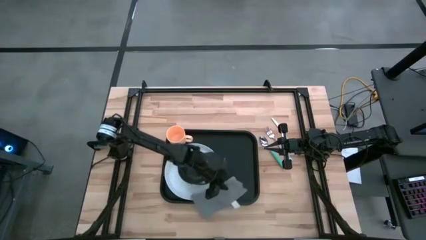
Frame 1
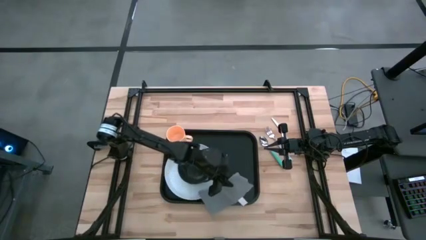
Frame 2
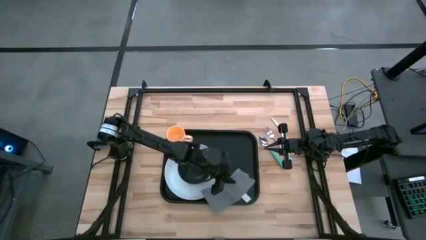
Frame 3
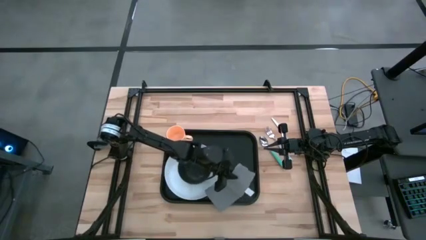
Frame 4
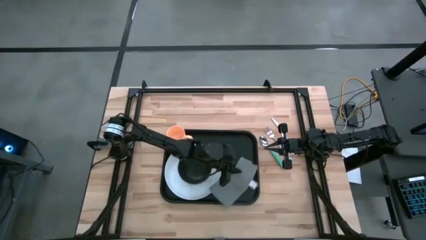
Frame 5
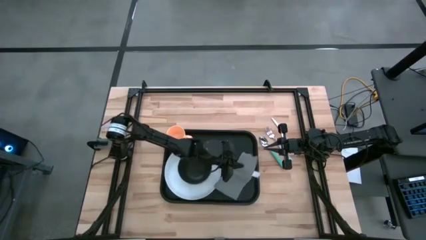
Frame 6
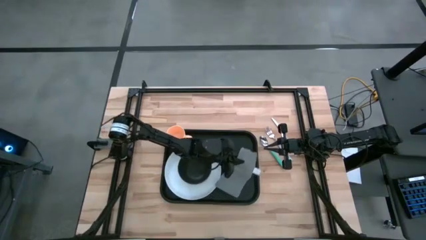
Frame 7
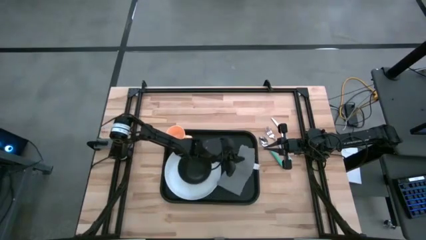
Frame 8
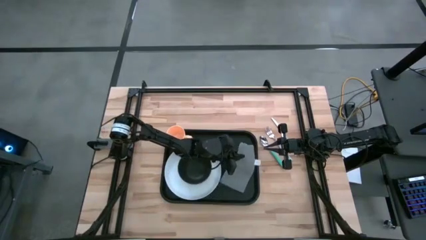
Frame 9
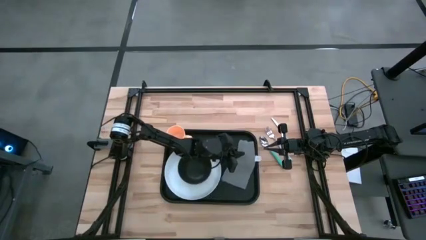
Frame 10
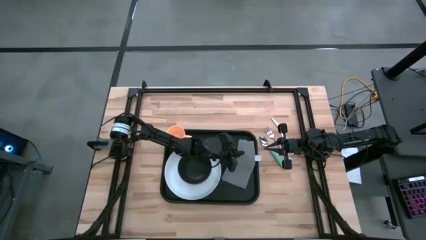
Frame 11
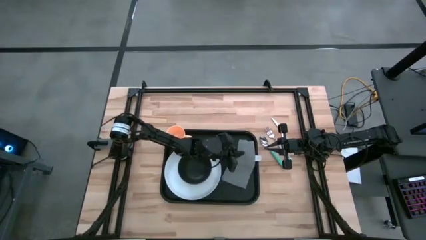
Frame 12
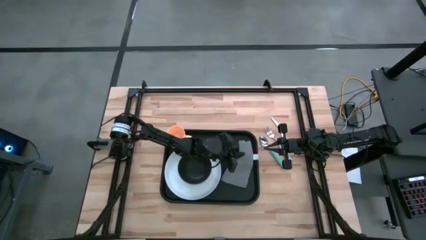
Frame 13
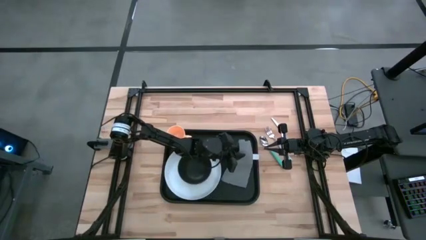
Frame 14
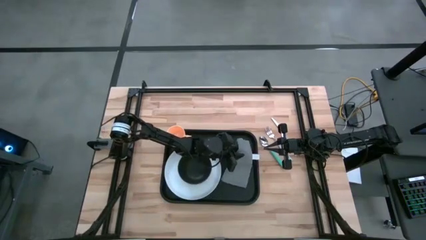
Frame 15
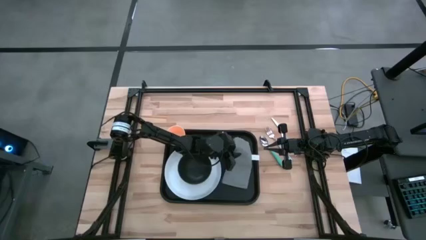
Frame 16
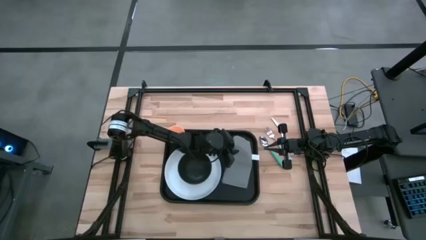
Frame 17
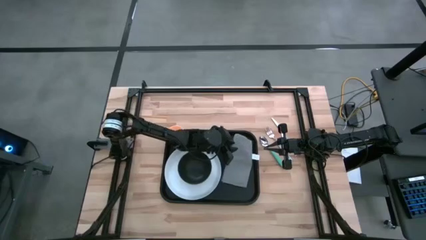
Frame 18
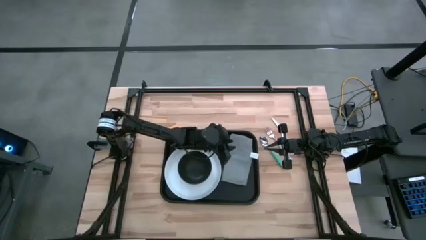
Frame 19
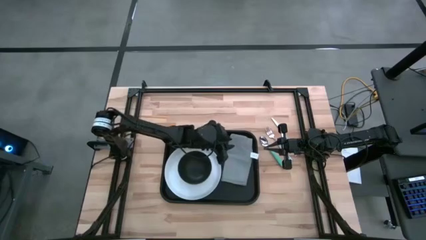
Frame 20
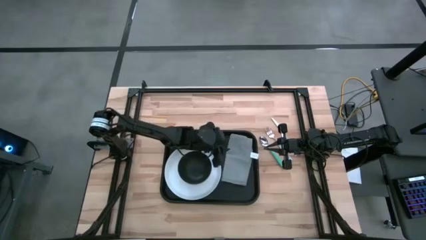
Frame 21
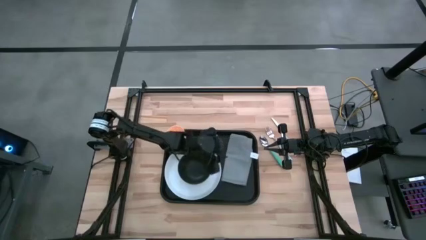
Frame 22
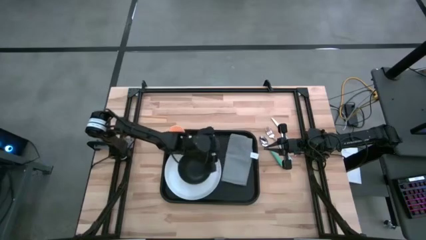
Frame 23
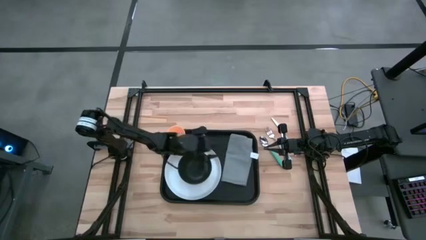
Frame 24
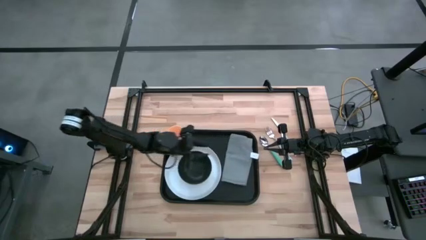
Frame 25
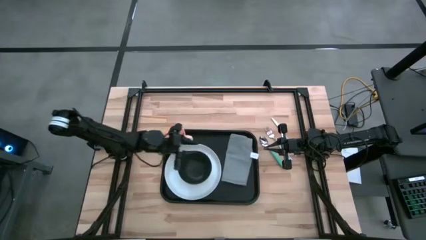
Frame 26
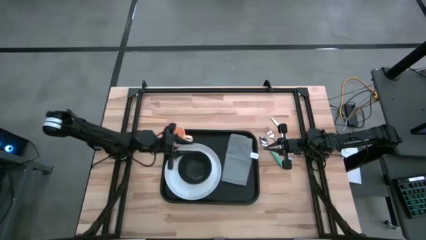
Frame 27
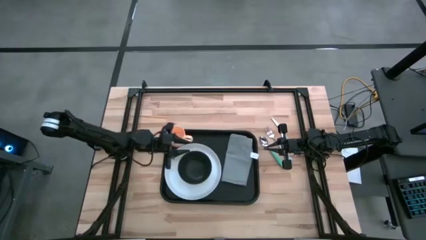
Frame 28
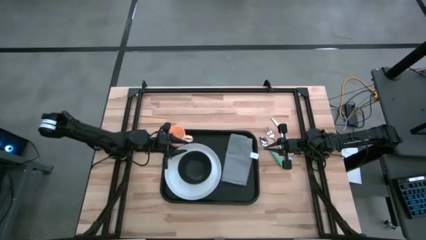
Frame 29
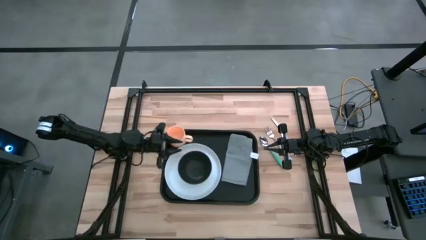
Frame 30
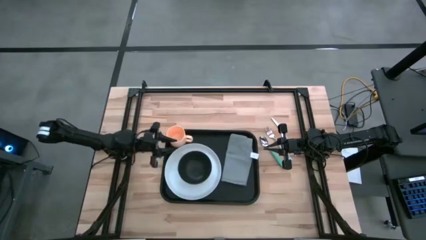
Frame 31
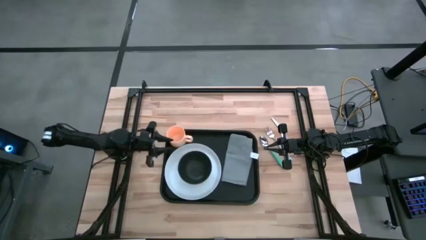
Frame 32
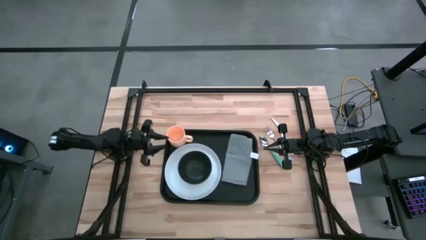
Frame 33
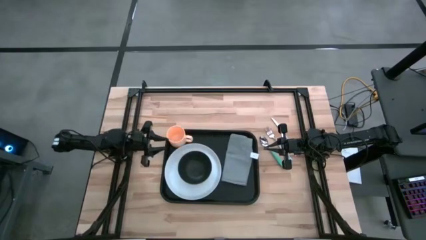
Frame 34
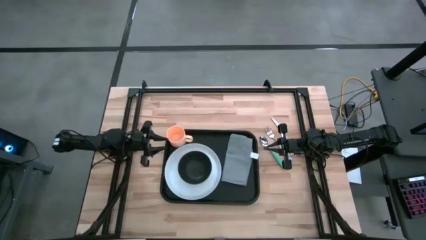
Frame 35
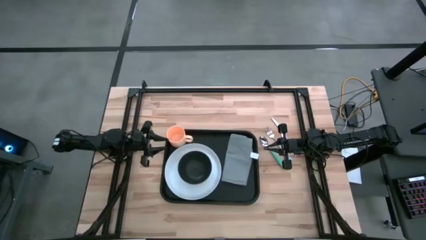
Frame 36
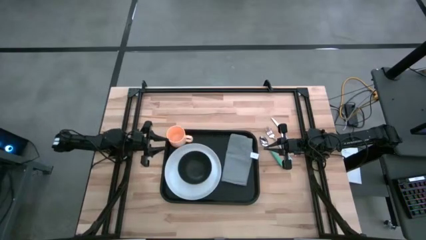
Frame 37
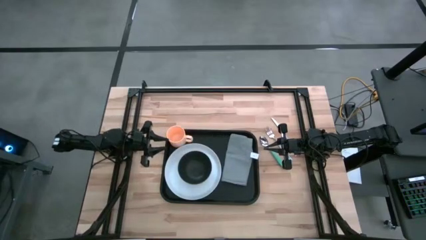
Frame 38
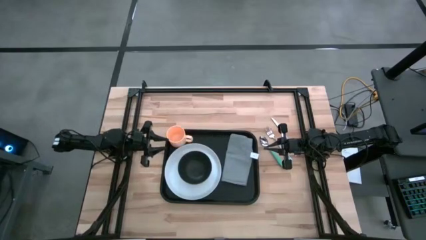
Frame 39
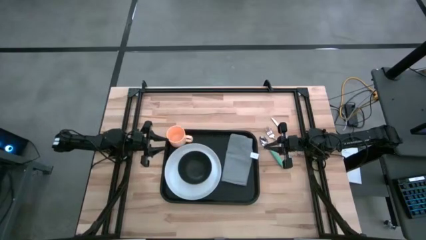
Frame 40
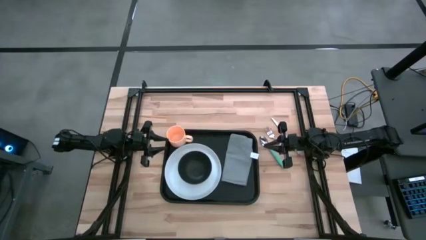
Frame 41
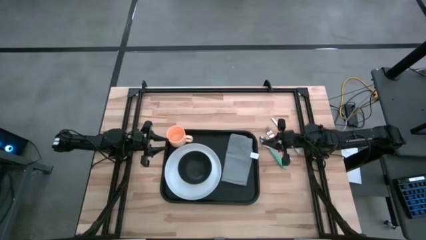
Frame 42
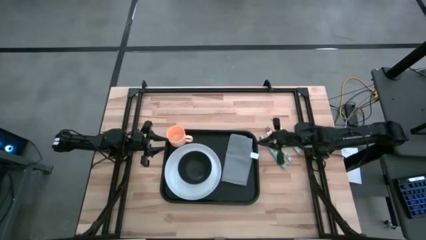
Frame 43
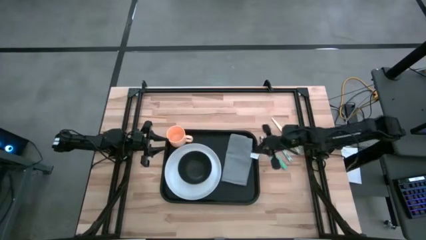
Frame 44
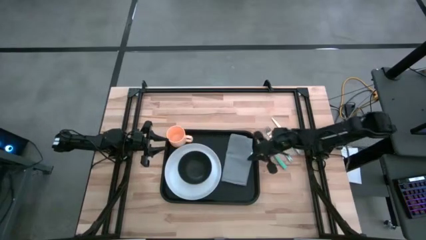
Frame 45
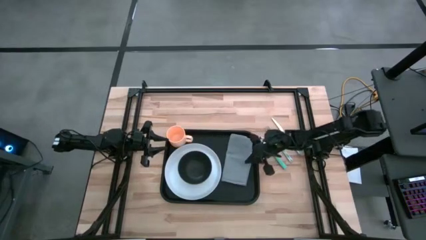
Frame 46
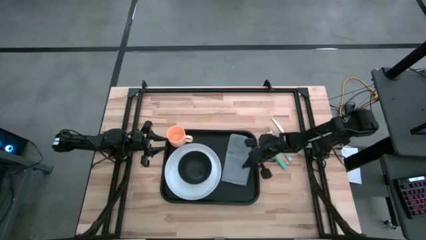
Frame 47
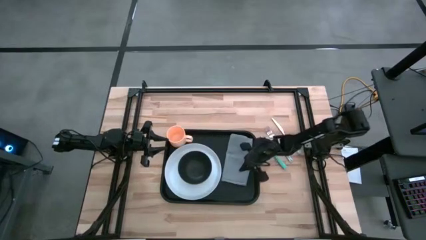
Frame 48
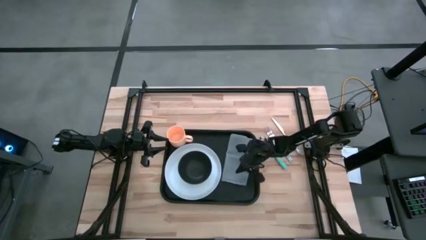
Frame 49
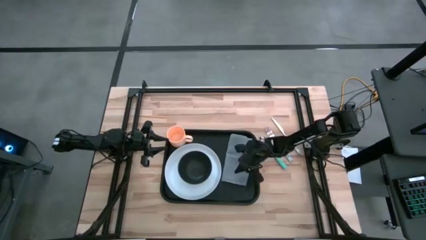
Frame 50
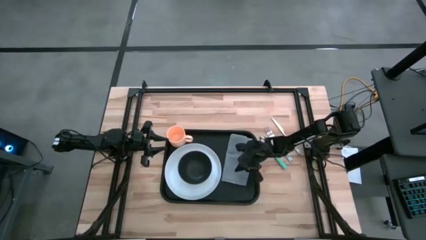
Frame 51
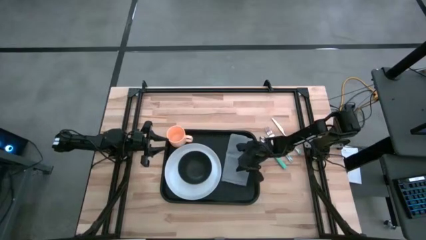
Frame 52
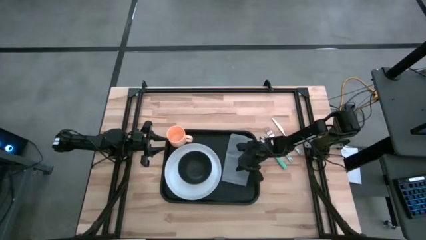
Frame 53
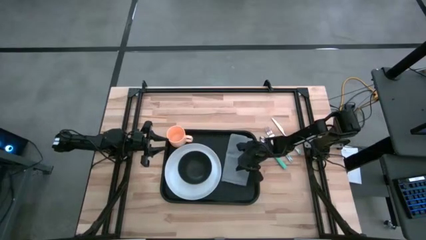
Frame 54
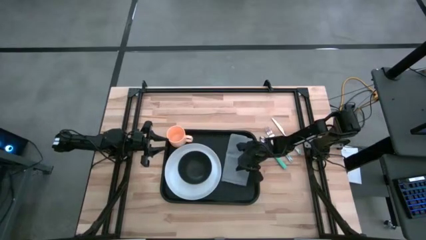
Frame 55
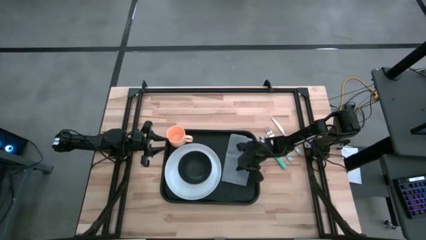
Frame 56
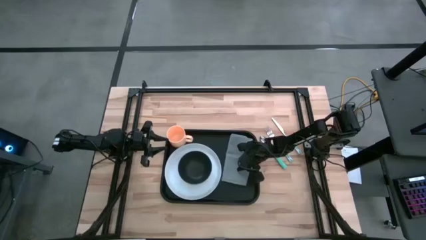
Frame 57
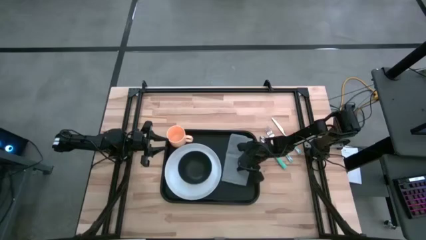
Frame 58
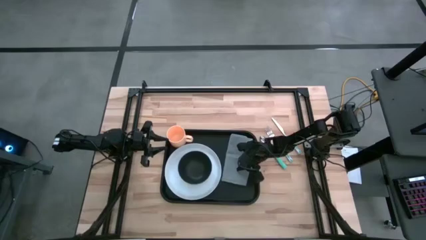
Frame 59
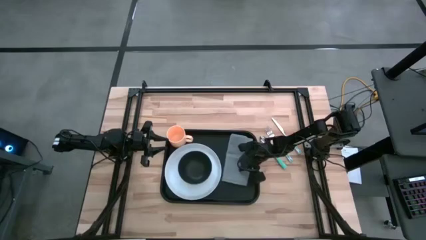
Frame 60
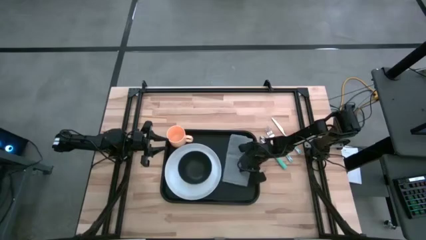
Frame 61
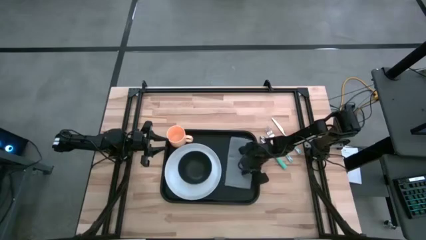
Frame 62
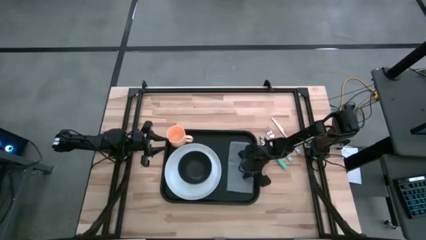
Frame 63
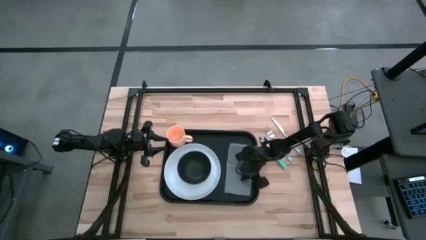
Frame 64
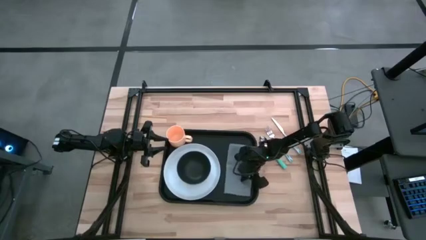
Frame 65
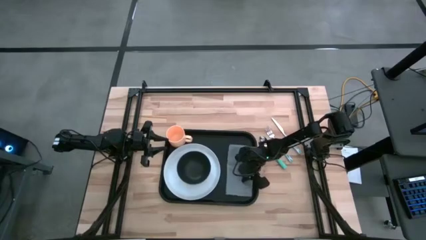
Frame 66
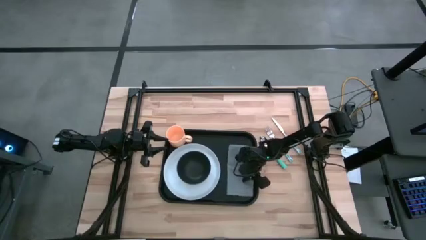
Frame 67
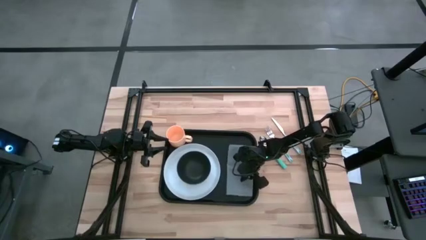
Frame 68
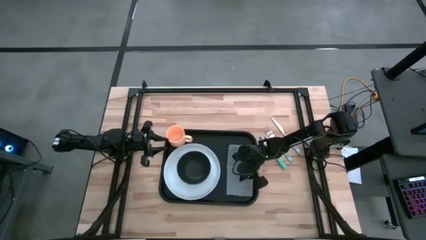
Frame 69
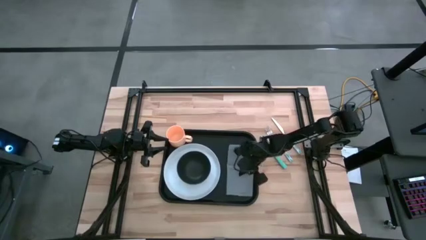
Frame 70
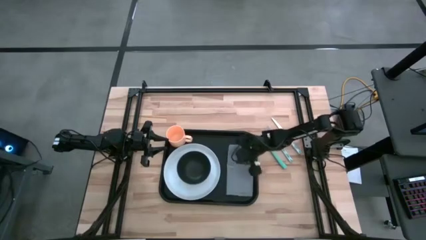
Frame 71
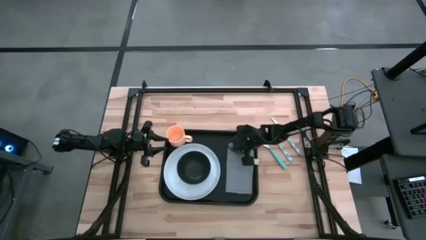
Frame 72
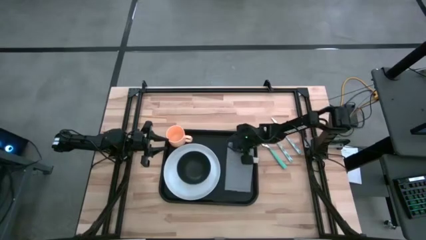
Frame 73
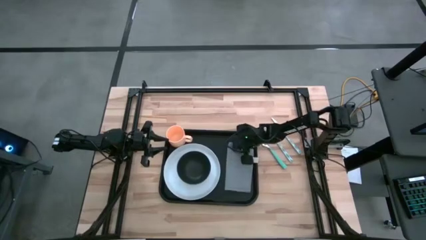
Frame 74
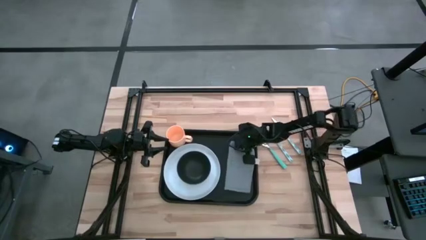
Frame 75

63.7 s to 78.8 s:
Task: Set up tray
Put the grey napkin on the black serving tray
